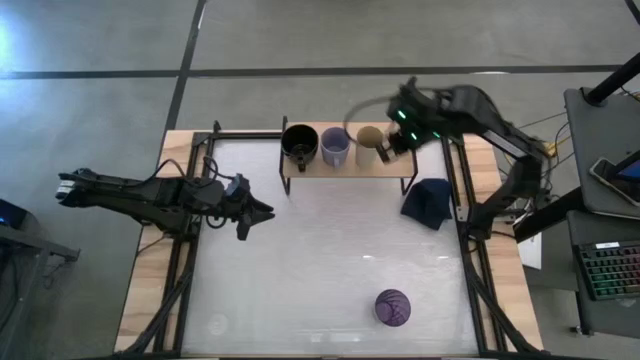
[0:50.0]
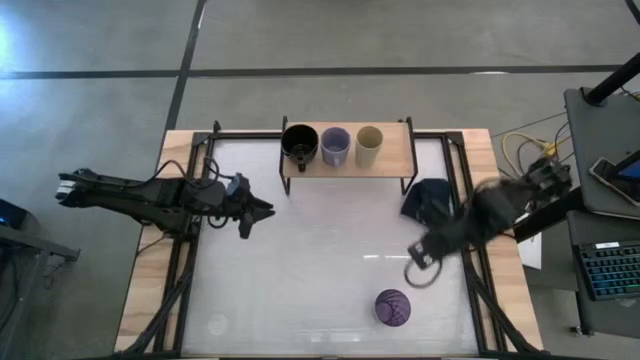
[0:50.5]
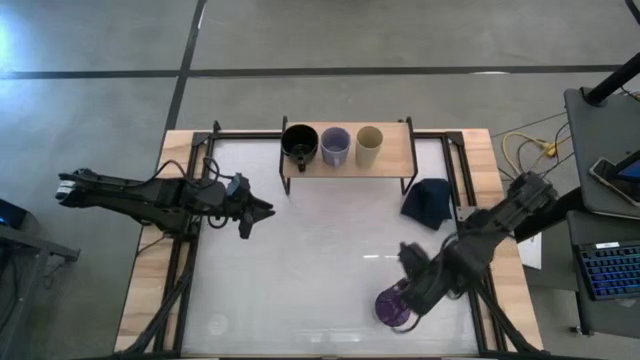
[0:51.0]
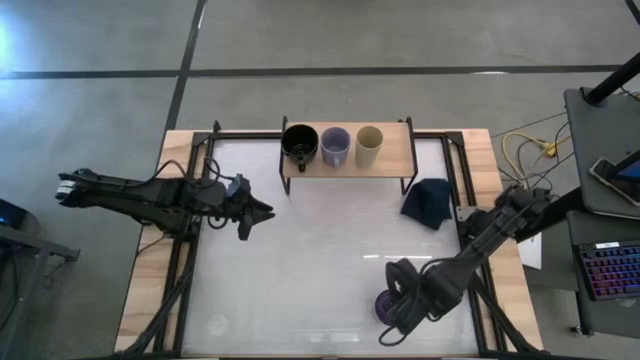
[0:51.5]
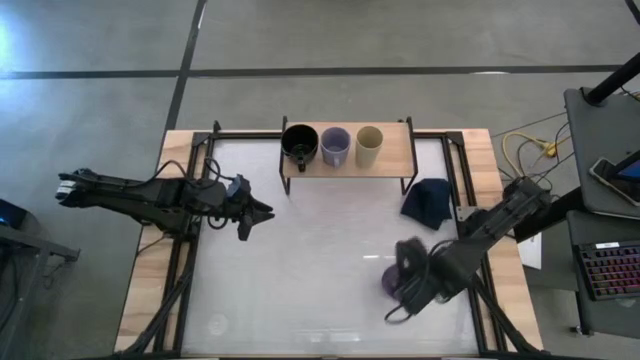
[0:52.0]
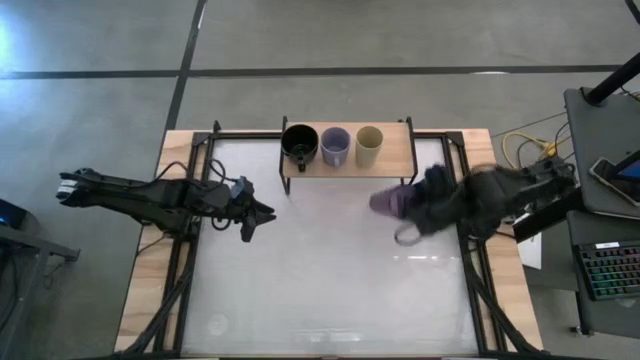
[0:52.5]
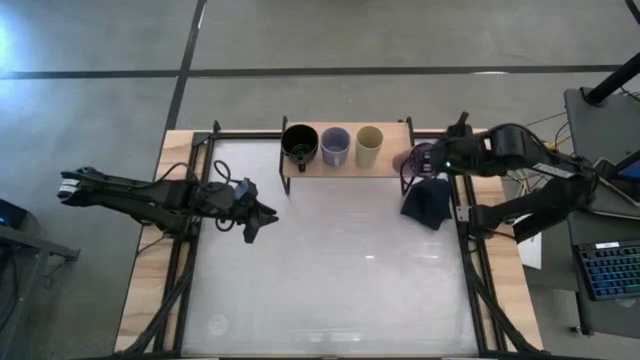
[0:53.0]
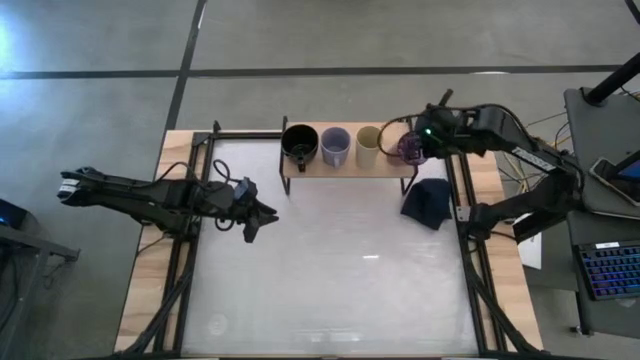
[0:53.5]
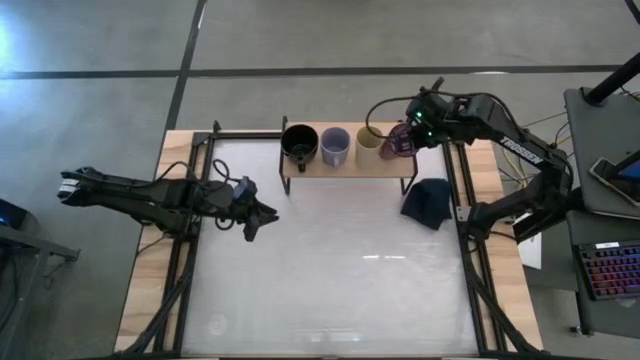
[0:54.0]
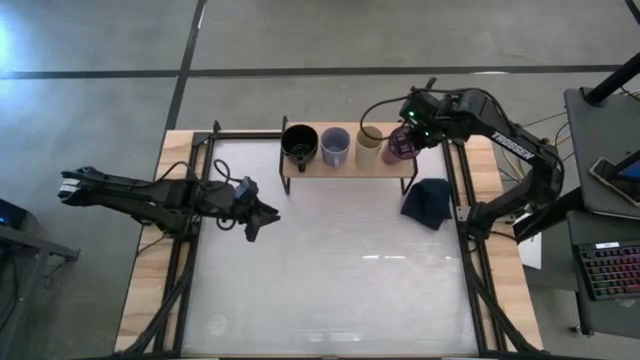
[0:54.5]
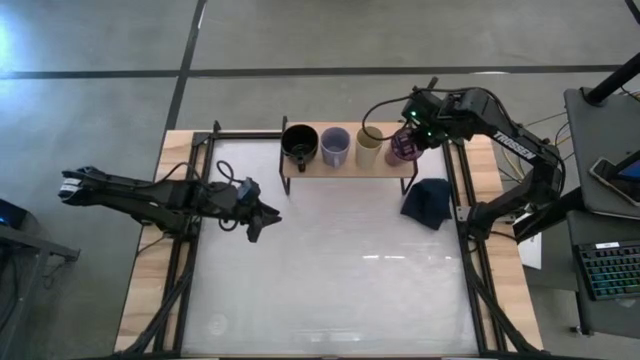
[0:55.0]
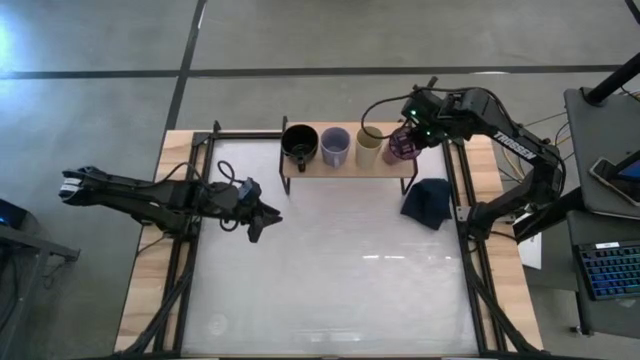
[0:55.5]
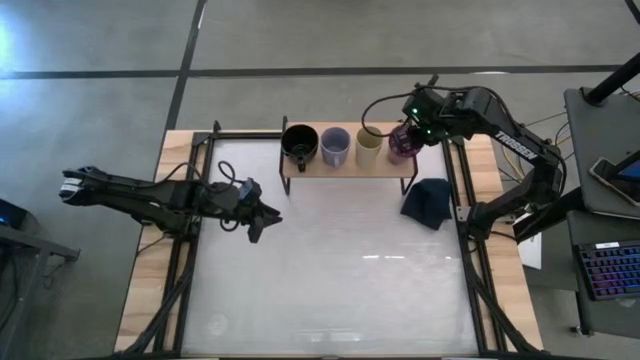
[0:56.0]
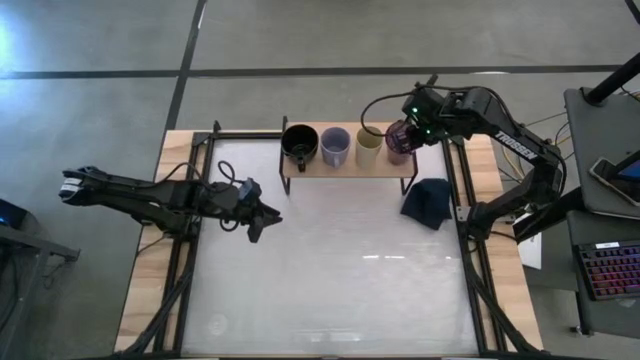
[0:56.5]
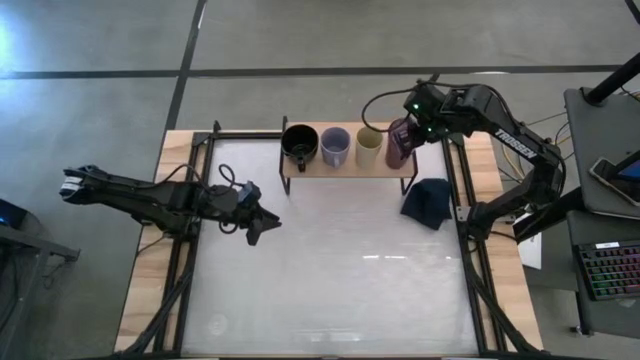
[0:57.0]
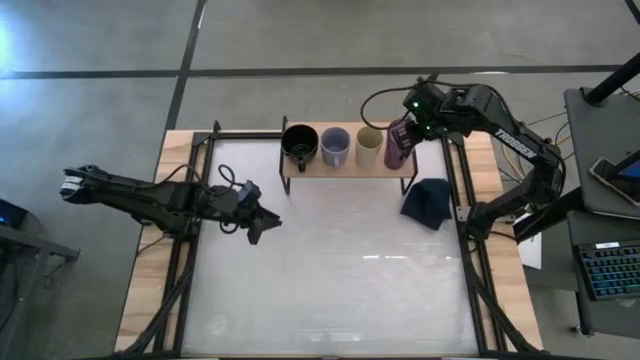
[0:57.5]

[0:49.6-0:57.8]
Task: Stack small to large cups/mugs on shelf
Put the violet cup on the shelf

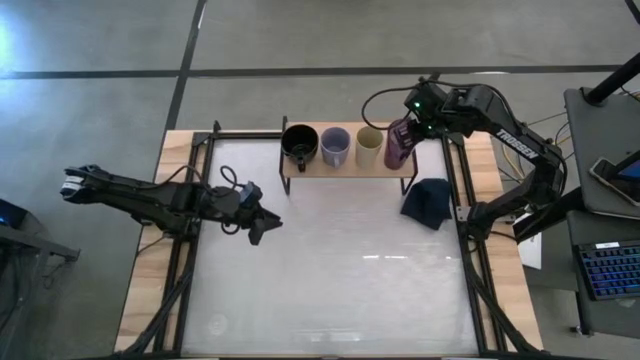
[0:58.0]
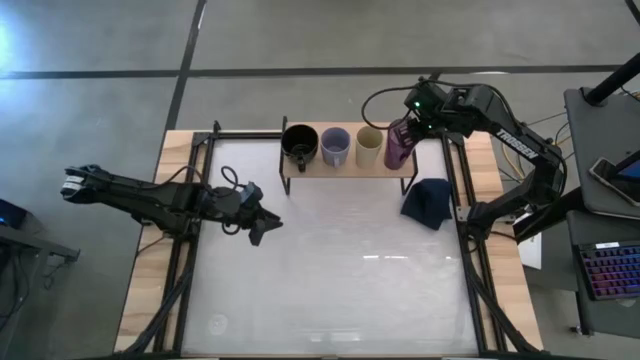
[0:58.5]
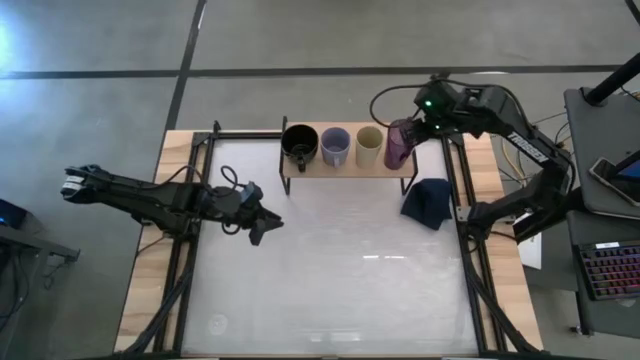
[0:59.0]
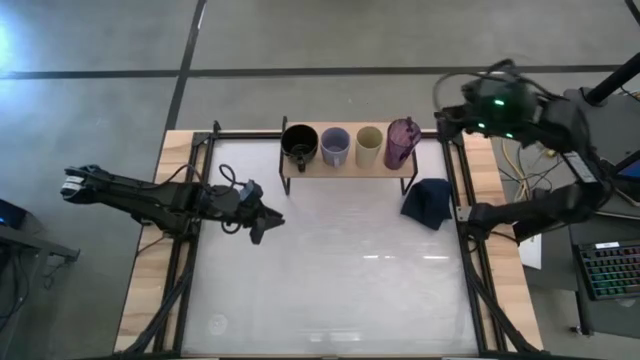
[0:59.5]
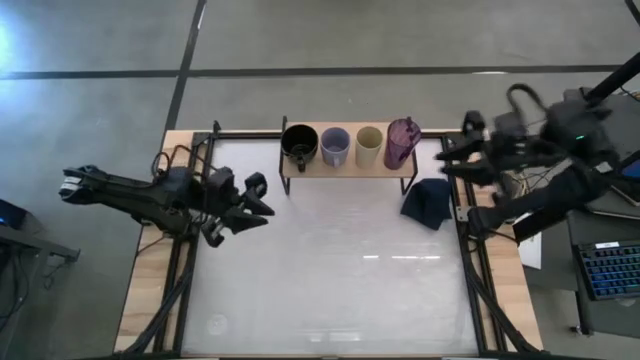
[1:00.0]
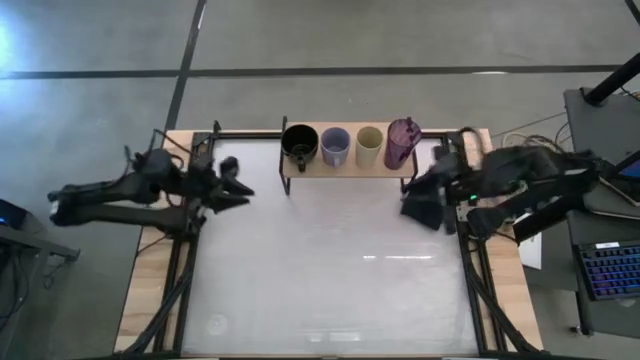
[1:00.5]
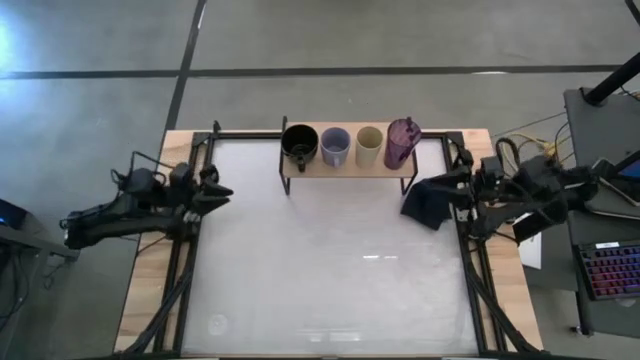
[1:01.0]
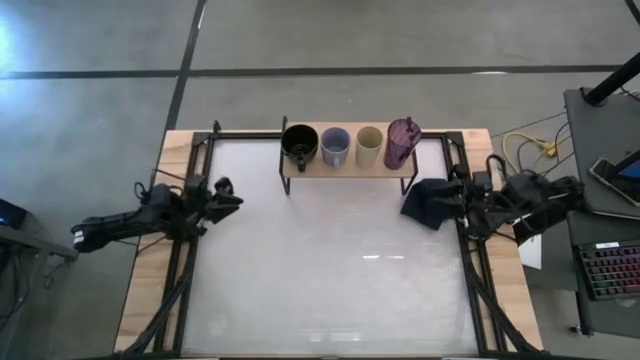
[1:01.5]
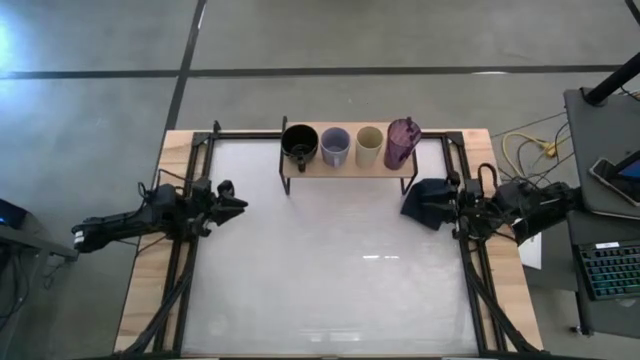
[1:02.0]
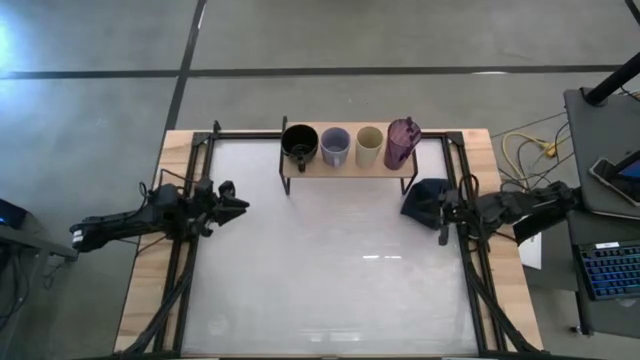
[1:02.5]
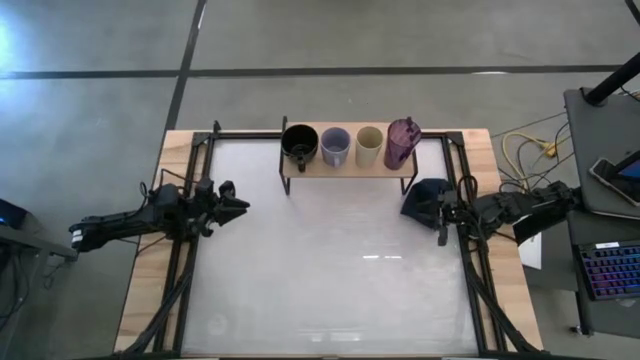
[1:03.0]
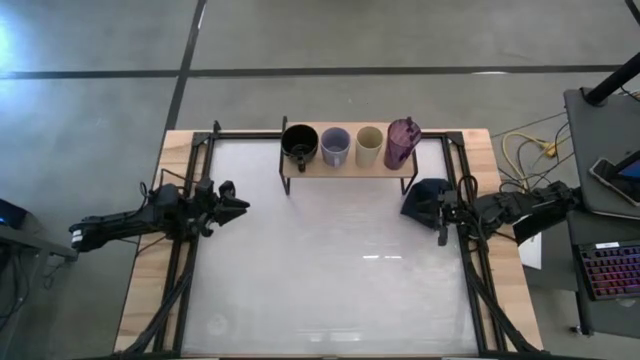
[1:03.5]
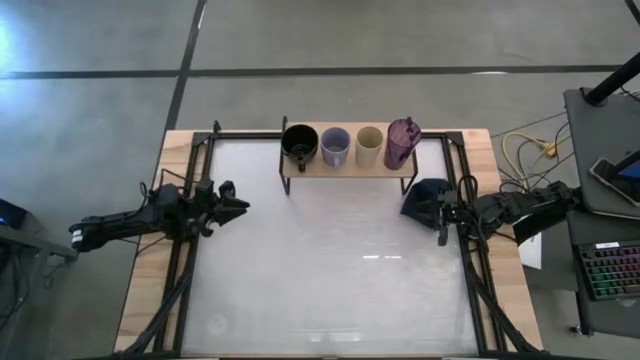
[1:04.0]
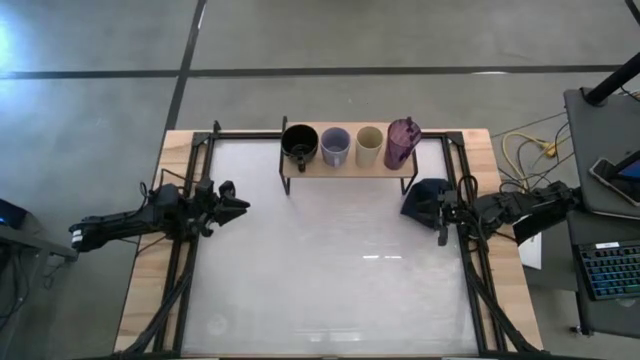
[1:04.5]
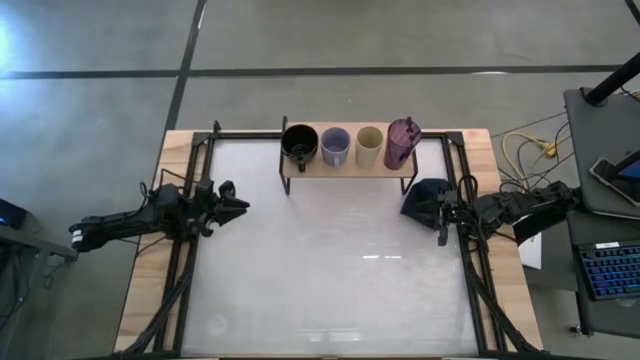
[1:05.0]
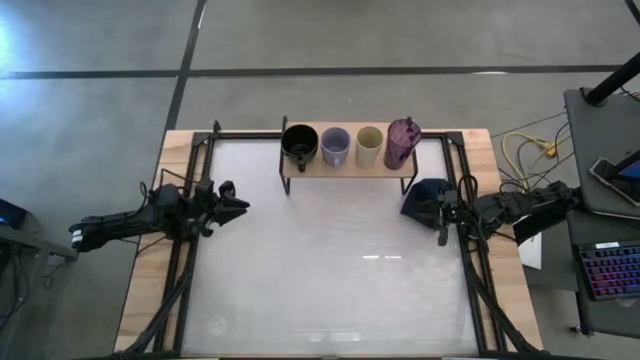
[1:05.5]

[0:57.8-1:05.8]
Return to Home Position

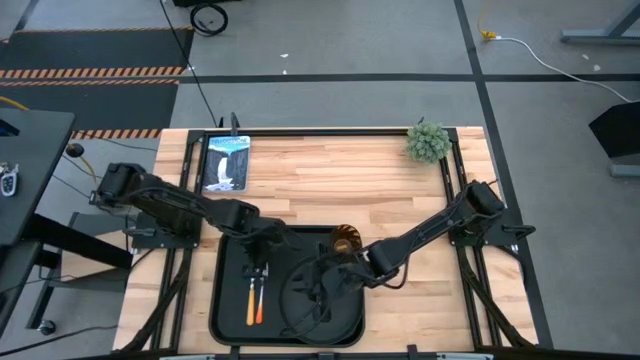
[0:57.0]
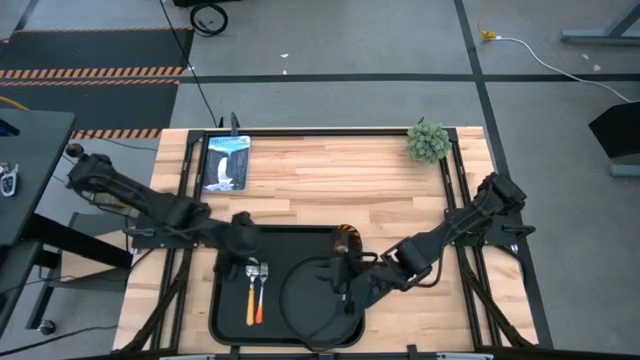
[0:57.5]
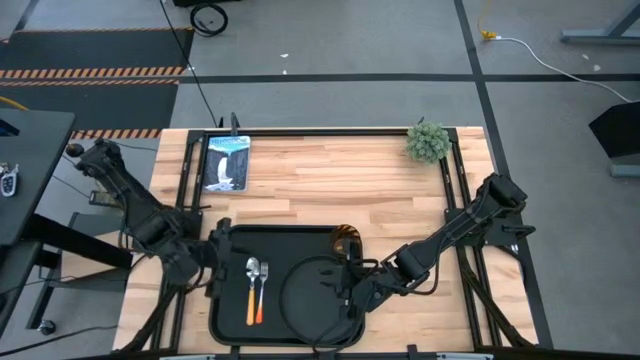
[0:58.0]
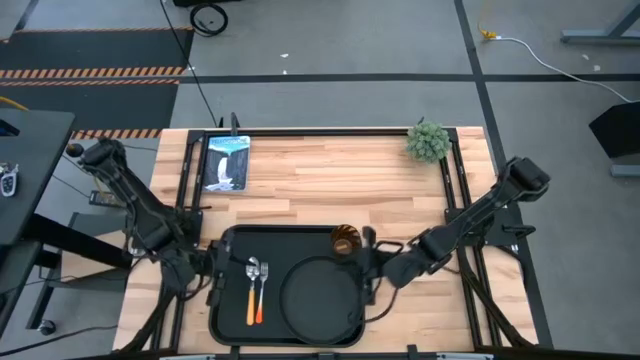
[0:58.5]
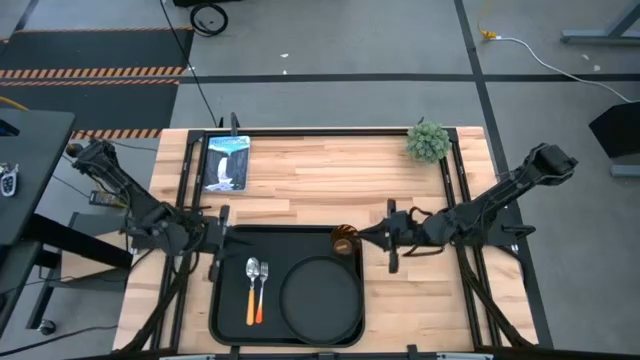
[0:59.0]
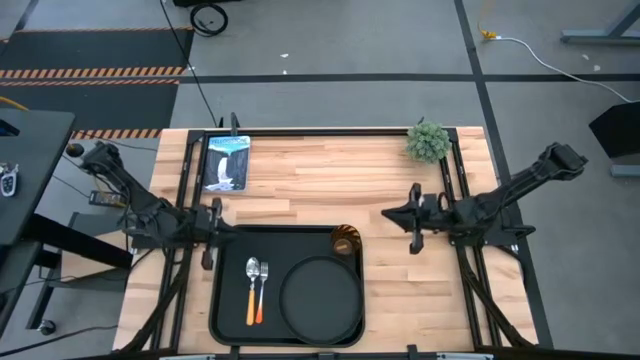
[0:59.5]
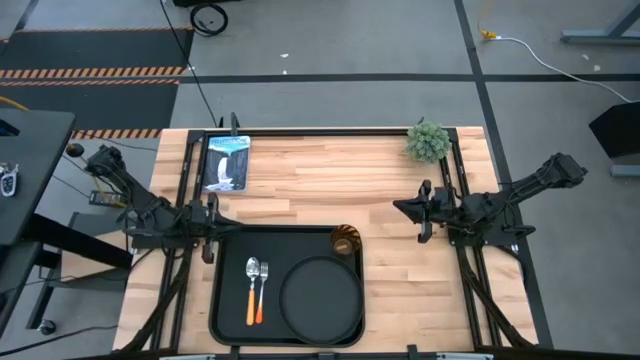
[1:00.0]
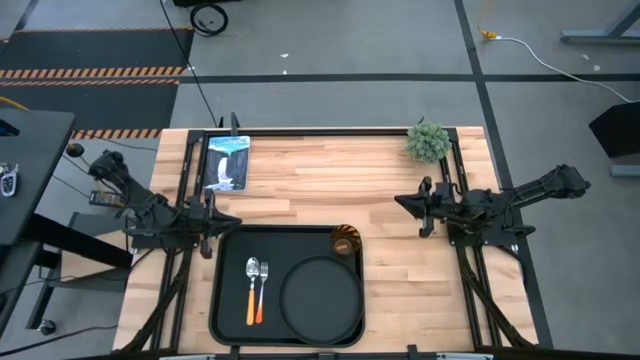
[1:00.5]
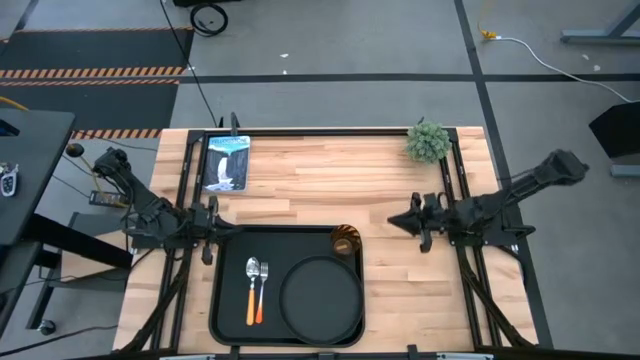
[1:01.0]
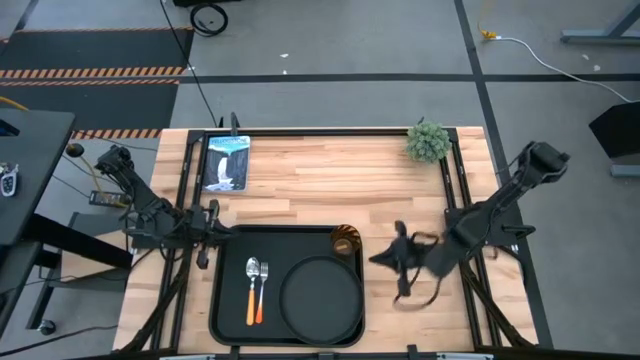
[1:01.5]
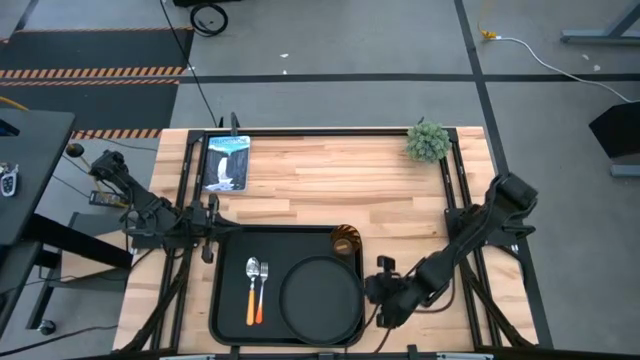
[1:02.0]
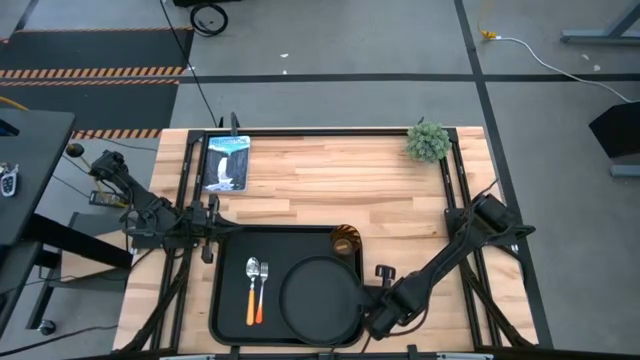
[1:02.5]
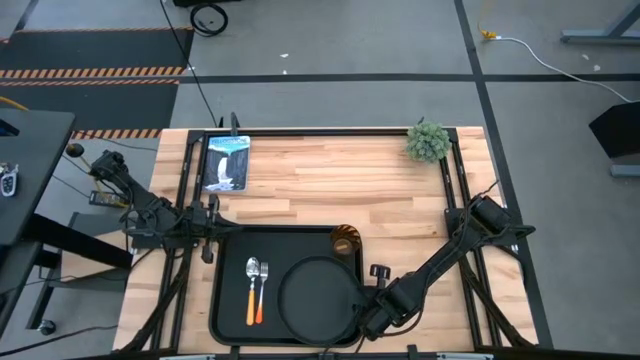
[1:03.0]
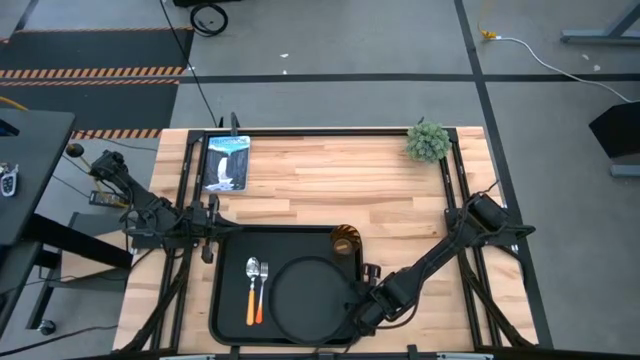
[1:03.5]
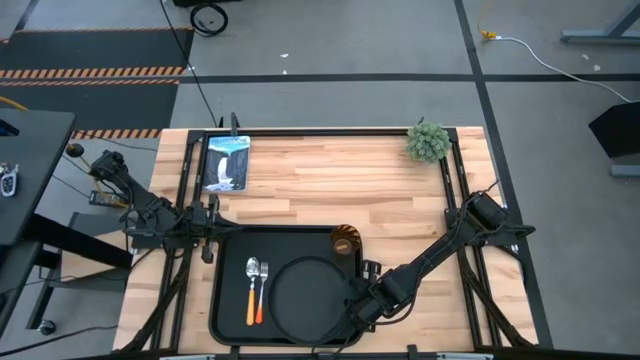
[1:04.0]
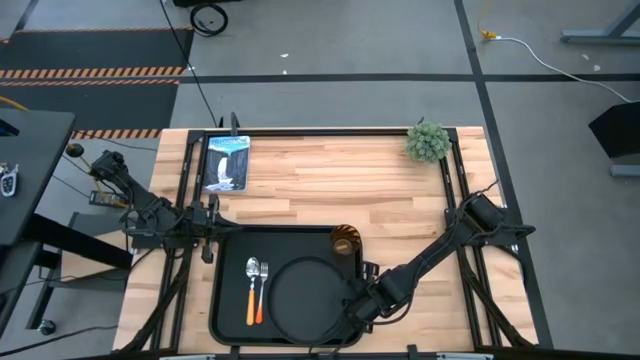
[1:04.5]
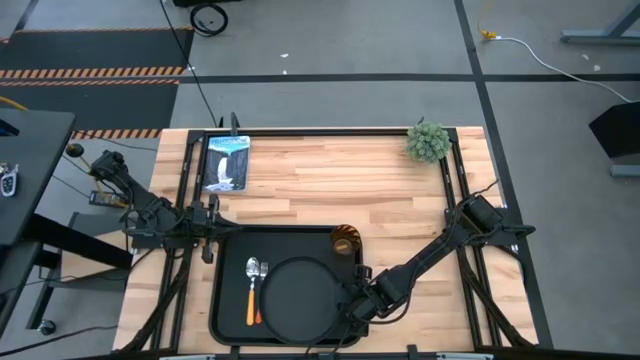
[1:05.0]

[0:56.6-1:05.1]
Task: Pick and place plate/cup/fork/spoon on tray
Adjust the black plate on the black tray
